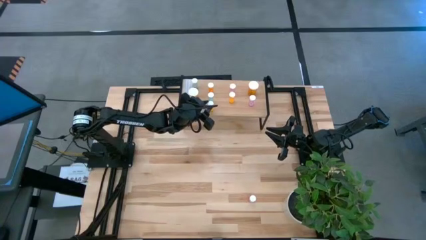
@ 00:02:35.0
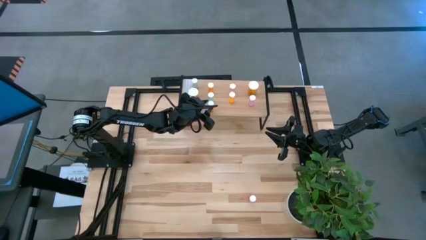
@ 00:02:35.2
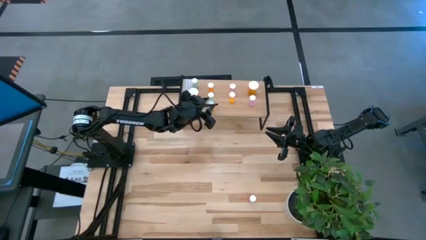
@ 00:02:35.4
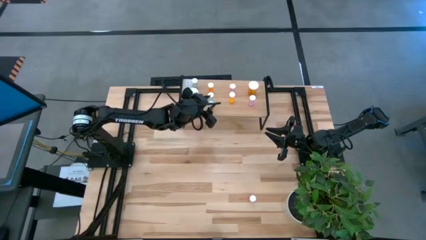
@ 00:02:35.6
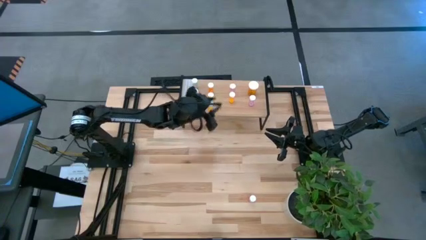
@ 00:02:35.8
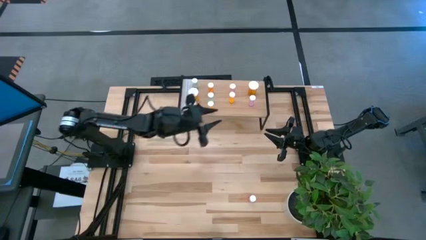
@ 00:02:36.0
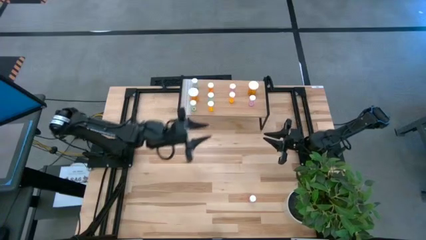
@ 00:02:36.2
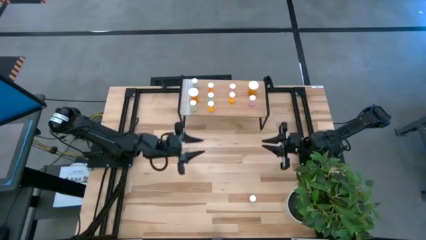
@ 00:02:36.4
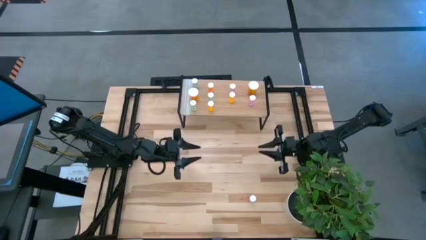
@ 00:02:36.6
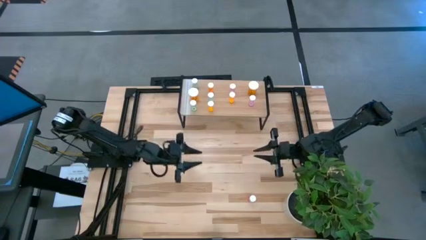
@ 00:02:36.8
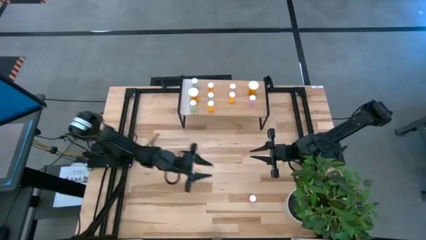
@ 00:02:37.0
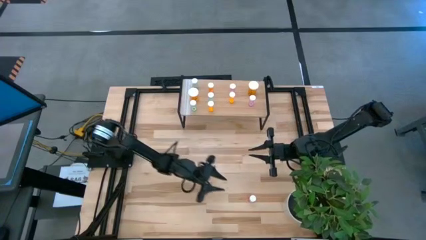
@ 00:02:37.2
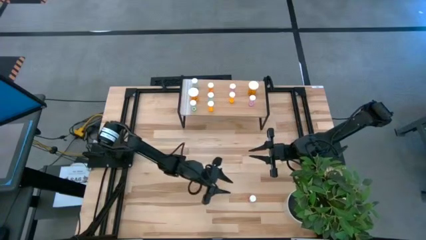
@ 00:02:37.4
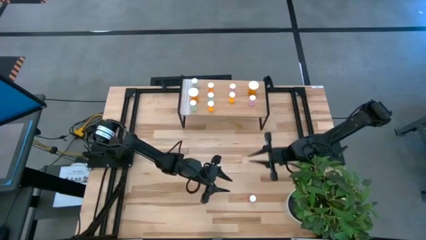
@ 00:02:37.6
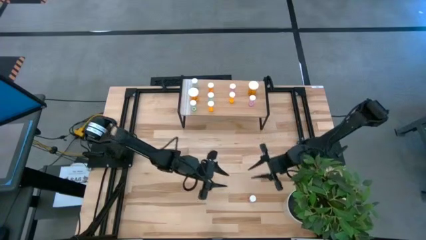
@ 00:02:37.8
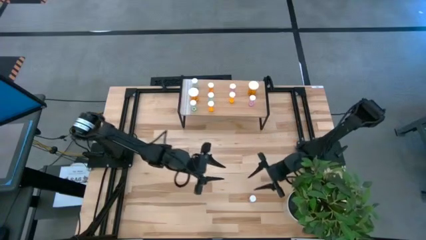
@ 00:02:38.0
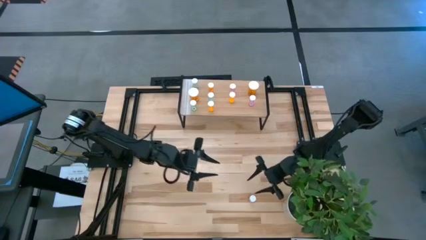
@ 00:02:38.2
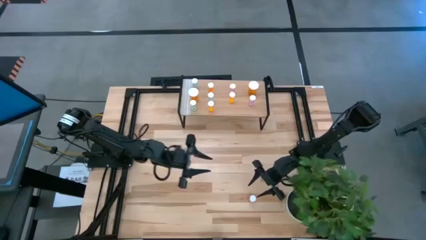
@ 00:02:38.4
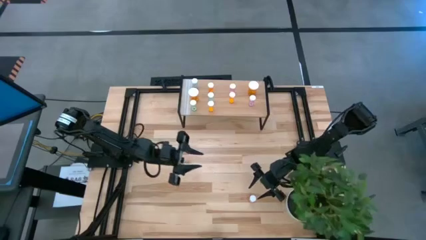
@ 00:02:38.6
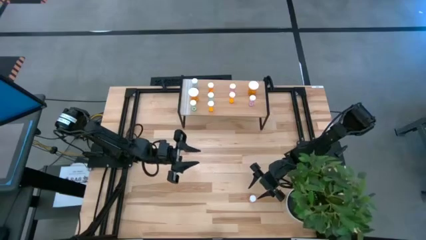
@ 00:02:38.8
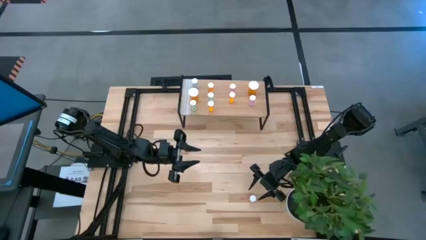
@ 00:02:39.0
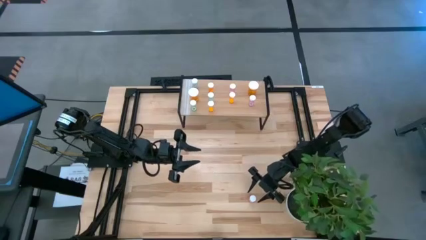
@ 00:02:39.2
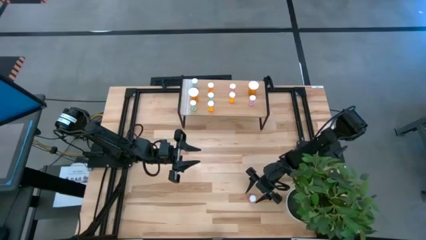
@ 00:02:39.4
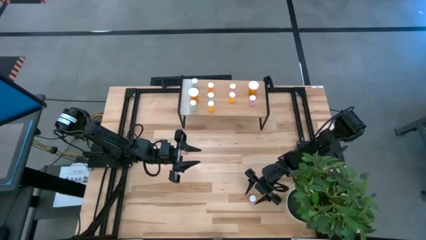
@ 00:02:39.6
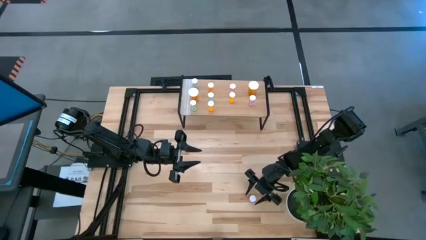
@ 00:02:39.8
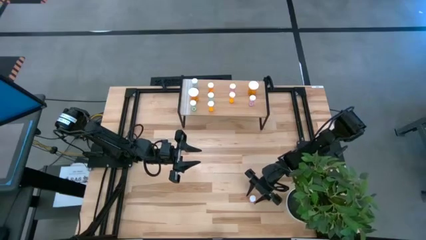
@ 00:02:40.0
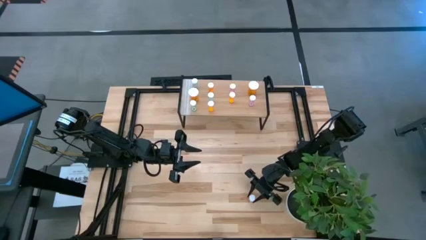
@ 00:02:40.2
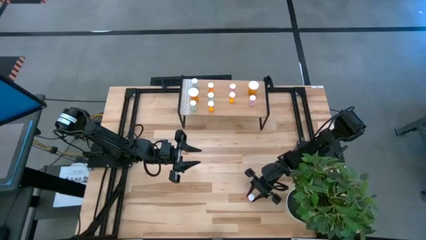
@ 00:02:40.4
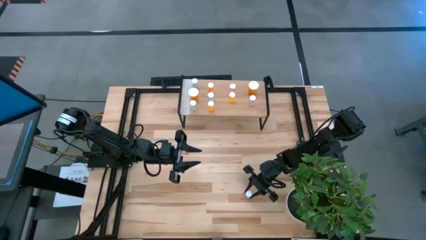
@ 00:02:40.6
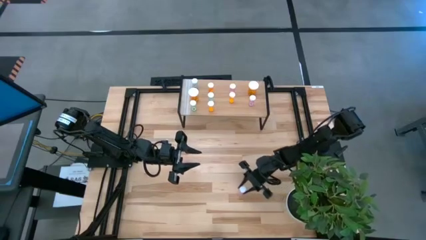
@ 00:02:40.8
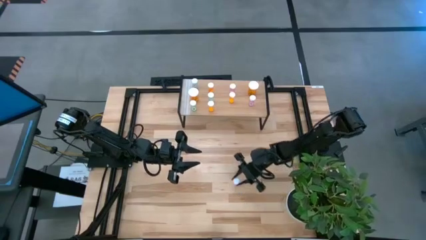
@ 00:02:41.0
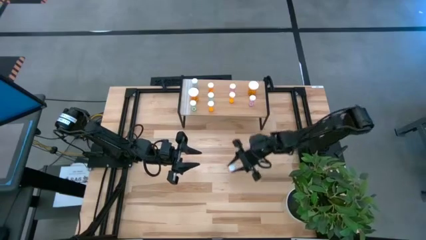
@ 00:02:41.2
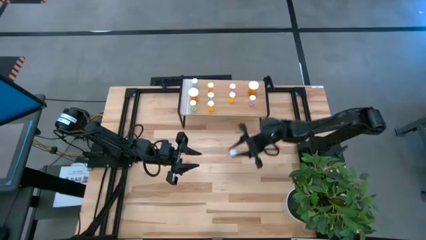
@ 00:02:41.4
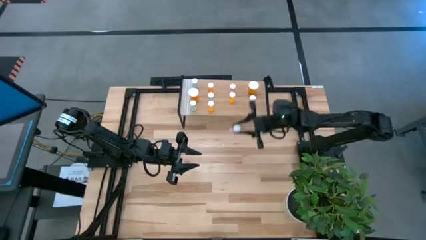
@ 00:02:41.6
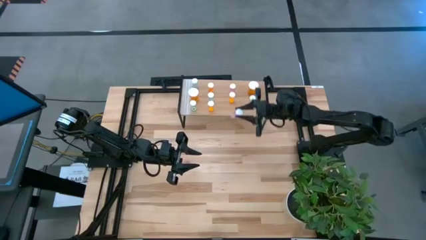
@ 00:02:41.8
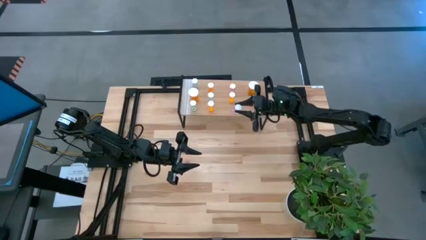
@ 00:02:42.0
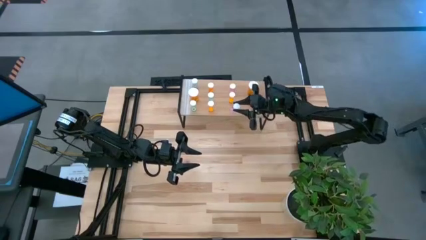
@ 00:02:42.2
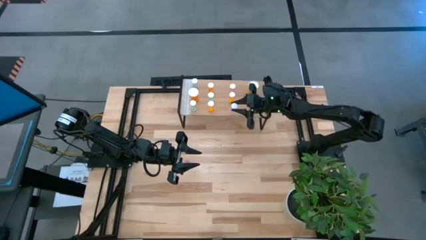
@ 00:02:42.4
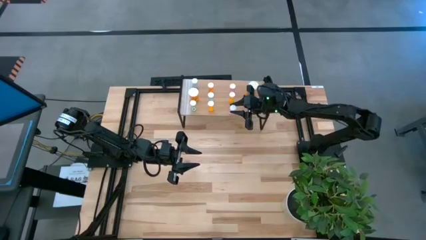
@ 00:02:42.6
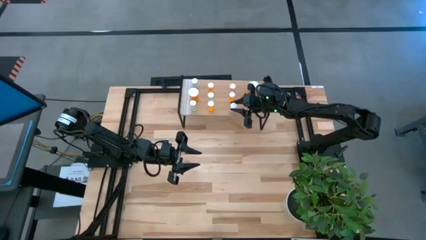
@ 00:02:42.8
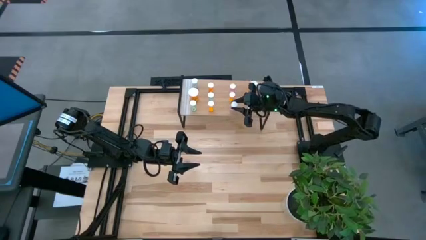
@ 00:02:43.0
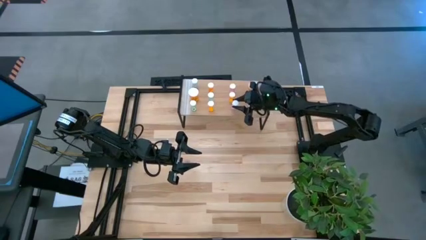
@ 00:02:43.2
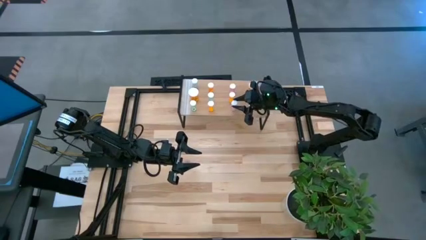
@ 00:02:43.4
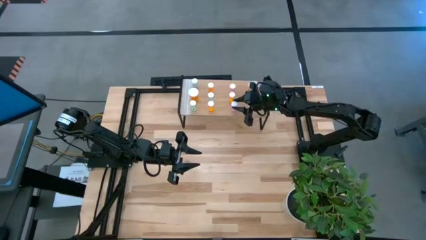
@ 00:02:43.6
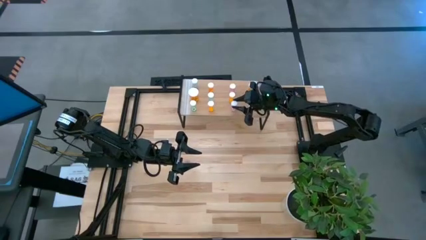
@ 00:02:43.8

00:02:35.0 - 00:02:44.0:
Task: Pick and place medicine bottles onto shelf by color
Put the pink pill bottle on the shelf

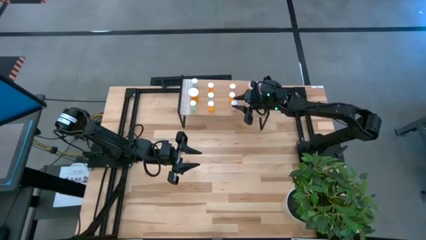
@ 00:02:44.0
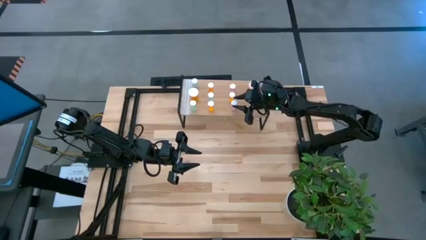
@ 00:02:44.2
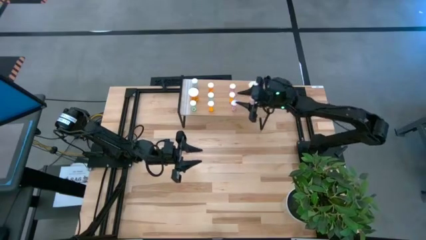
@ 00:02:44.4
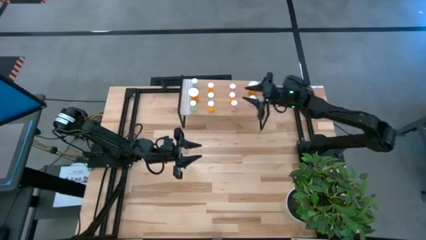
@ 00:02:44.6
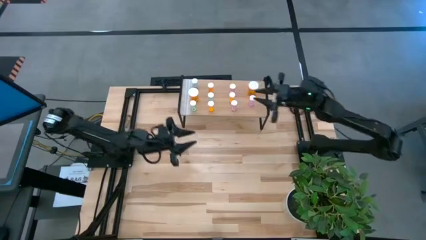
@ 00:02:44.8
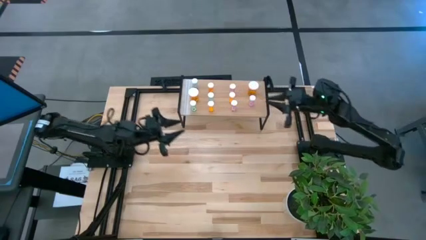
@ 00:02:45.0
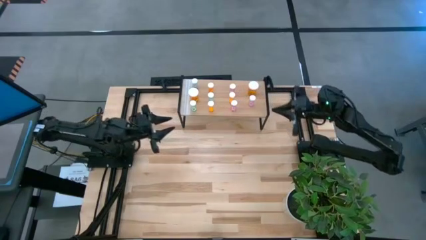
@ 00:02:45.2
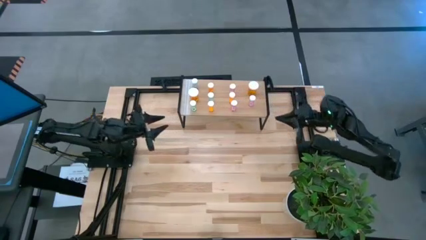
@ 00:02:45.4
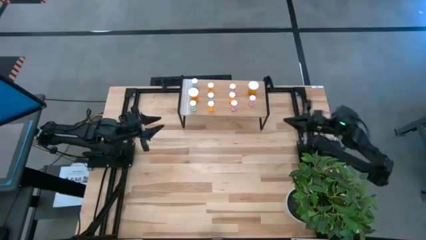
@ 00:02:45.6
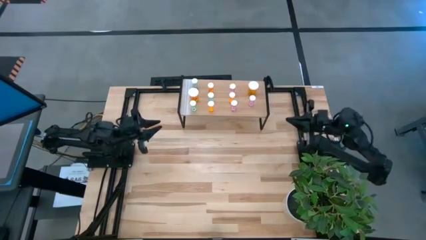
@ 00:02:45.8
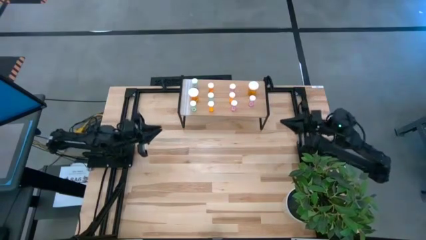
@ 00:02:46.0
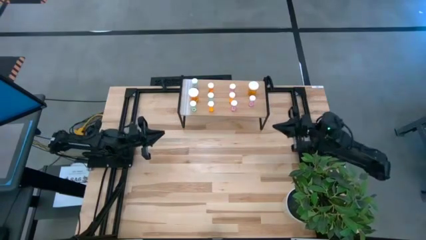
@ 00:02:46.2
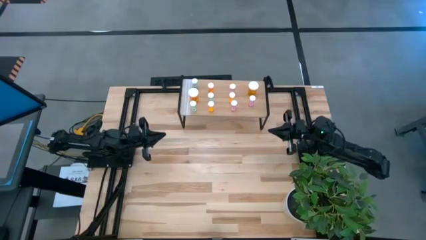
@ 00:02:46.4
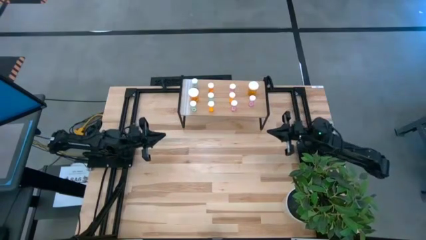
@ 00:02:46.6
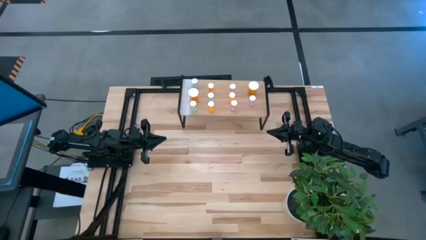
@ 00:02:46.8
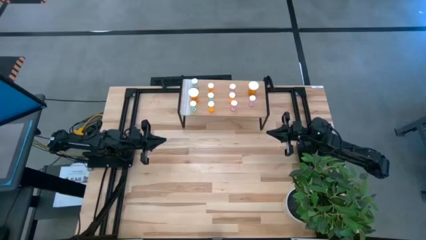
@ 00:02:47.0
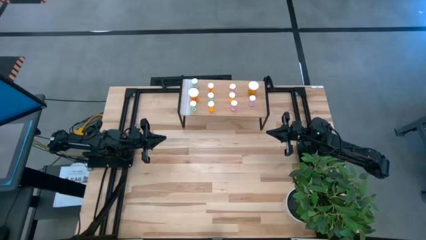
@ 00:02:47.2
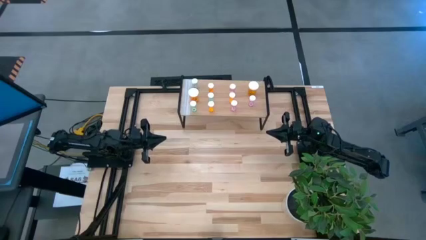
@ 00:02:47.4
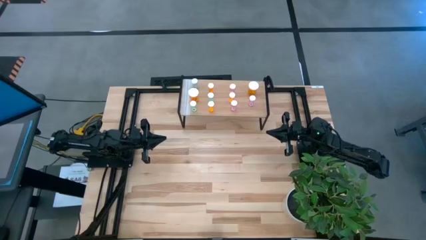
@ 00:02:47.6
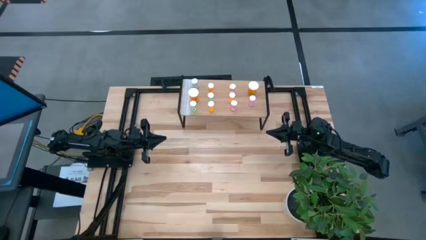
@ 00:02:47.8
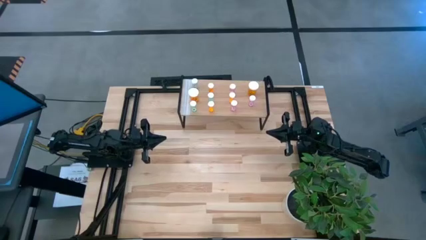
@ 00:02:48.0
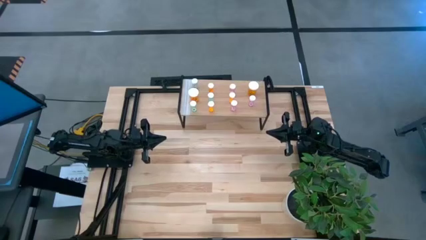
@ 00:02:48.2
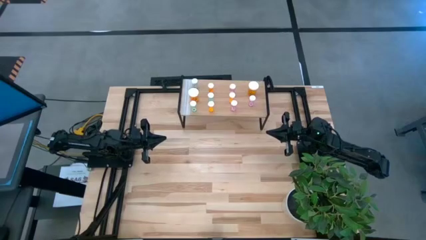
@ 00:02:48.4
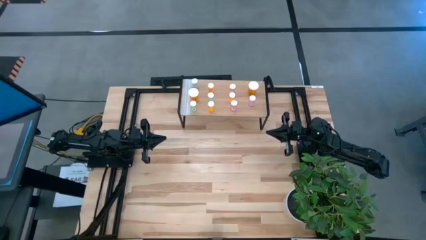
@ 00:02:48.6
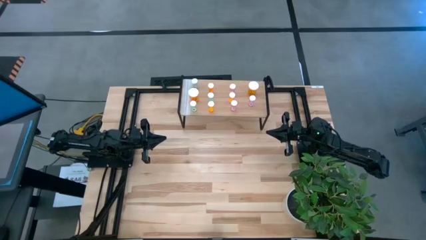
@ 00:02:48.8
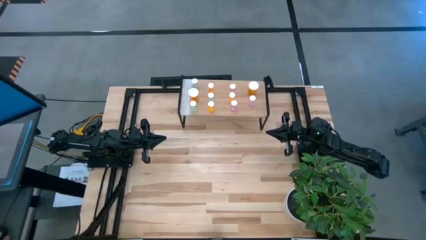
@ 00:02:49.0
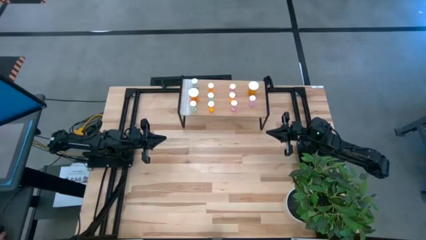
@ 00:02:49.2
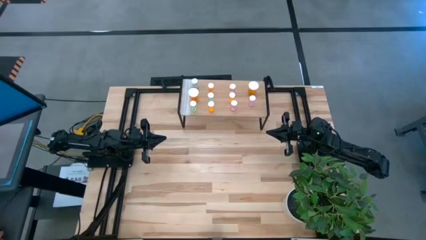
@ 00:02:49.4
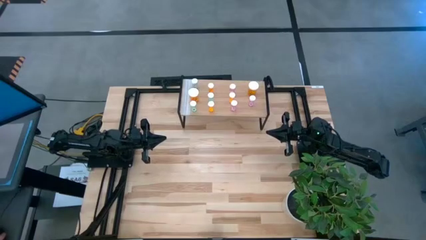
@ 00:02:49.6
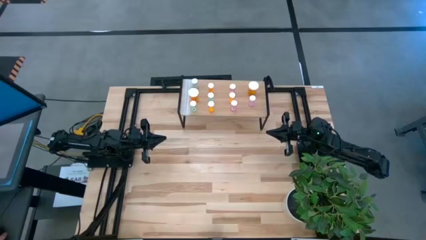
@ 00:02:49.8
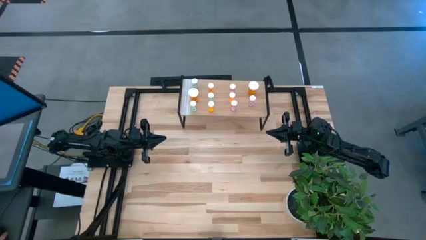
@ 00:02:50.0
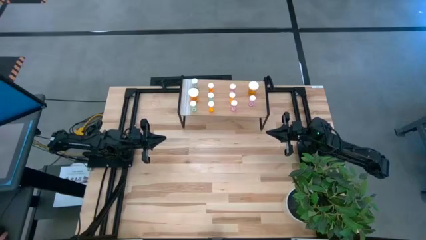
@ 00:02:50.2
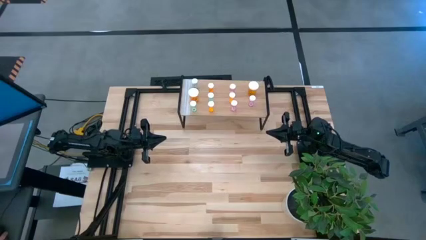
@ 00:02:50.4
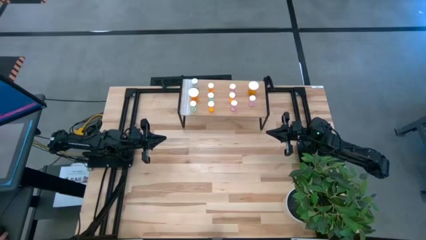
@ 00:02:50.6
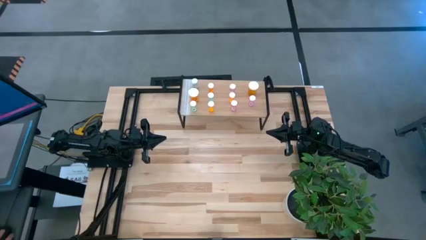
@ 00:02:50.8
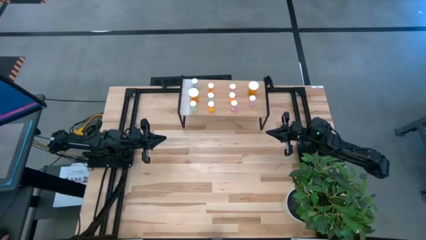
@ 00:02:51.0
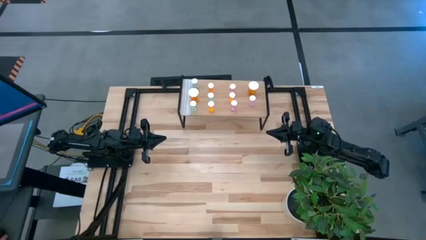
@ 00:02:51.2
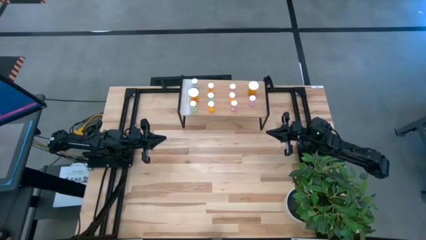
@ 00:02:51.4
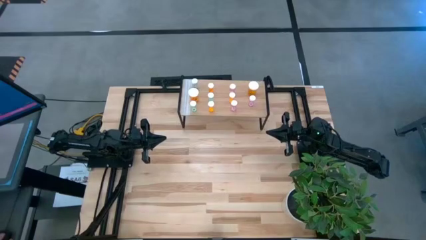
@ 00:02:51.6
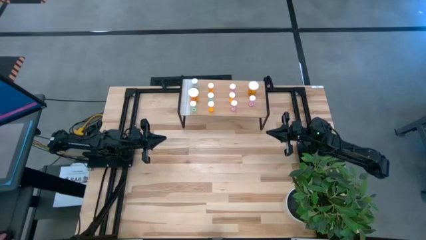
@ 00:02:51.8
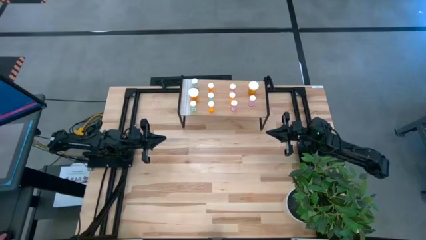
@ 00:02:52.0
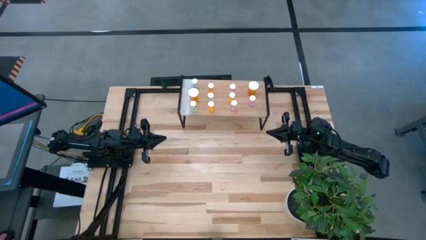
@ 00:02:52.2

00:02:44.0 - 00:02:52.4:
Return to Home Position
